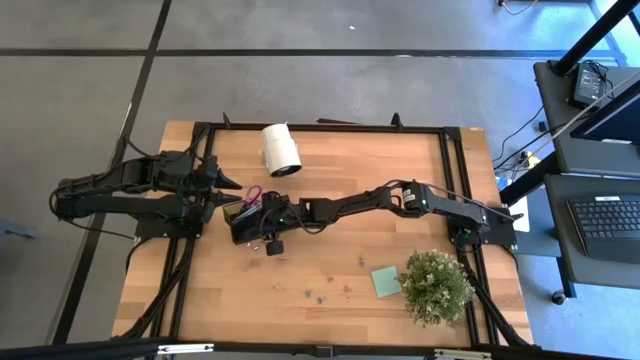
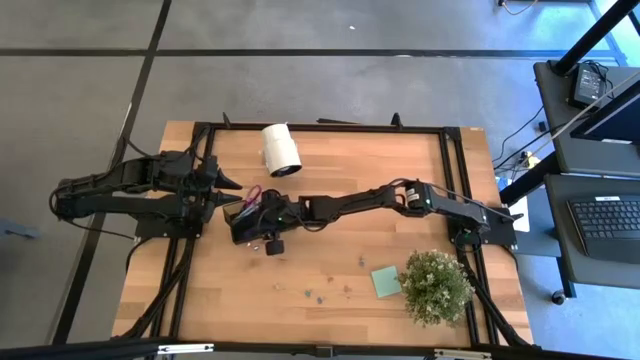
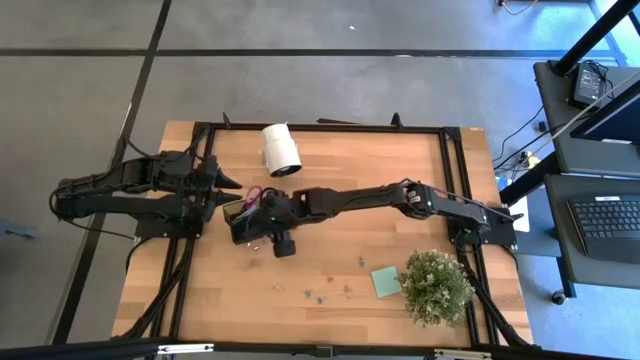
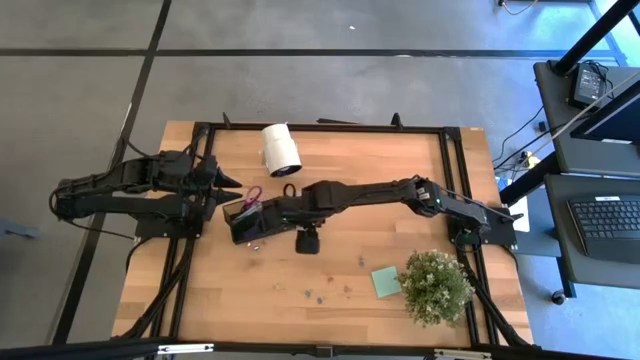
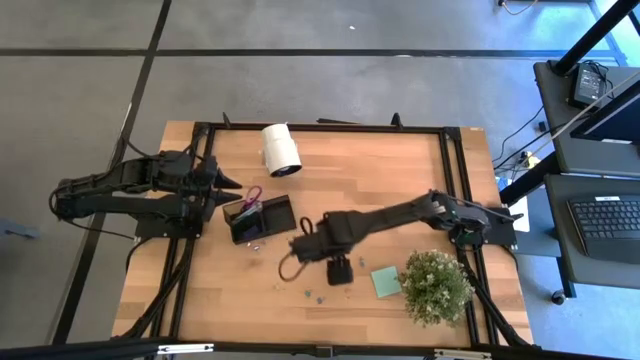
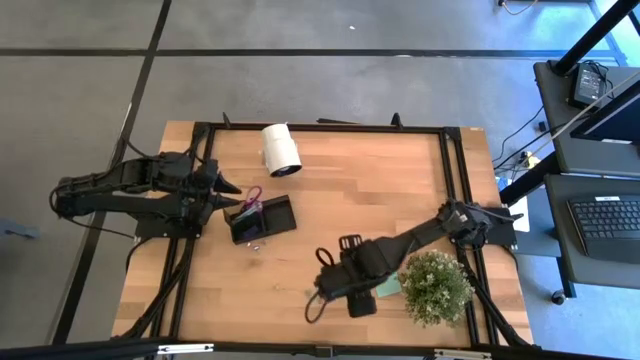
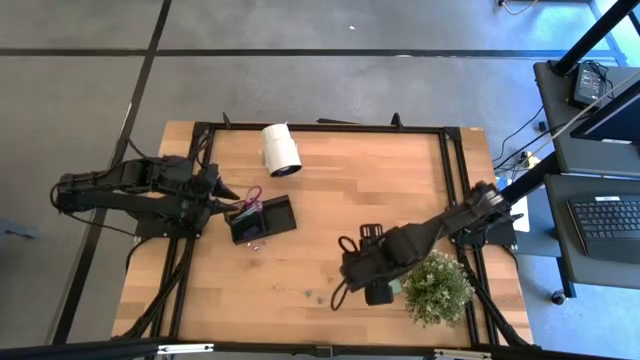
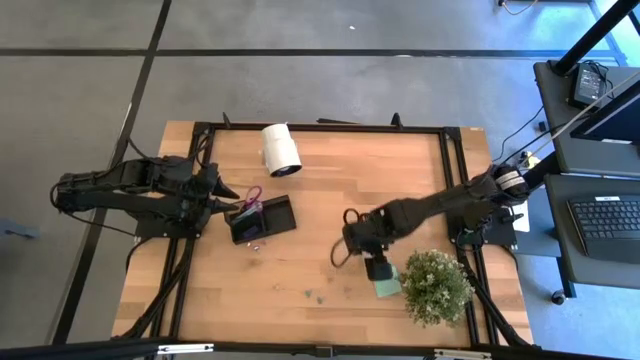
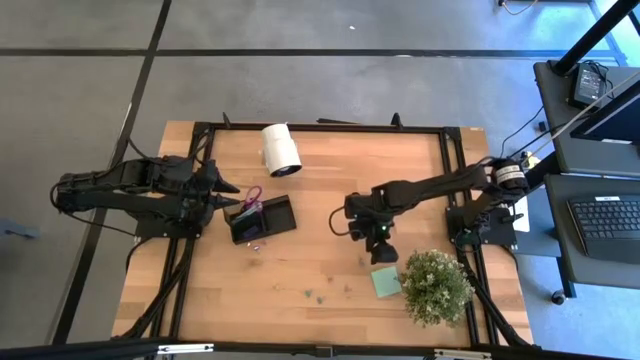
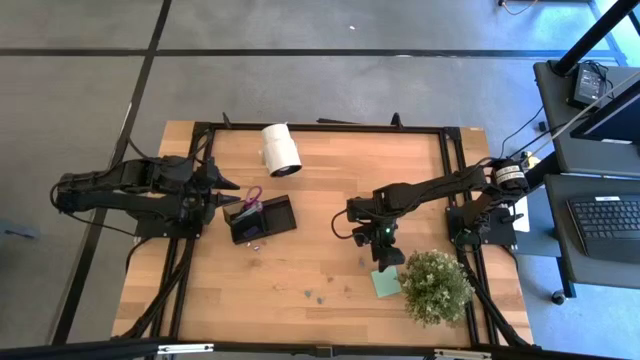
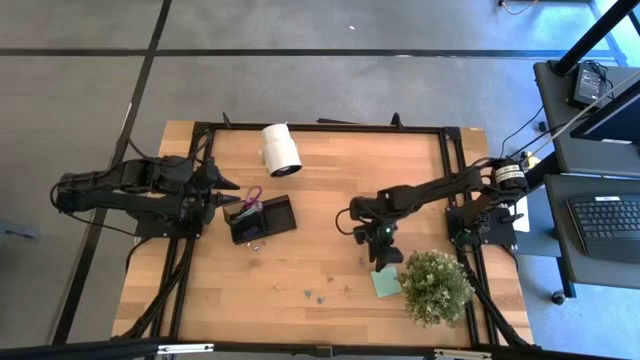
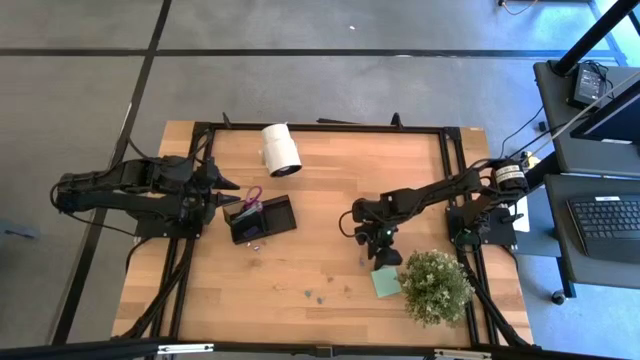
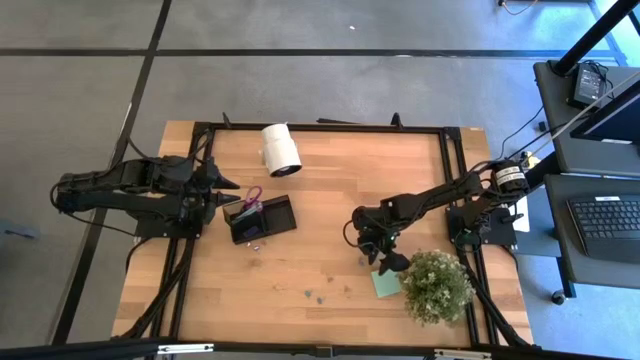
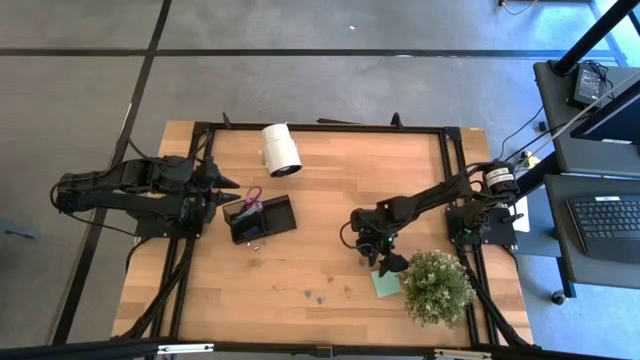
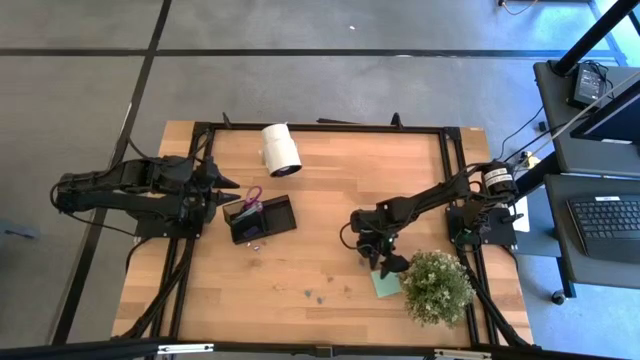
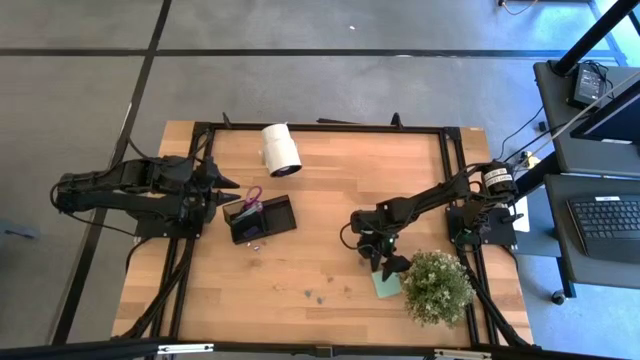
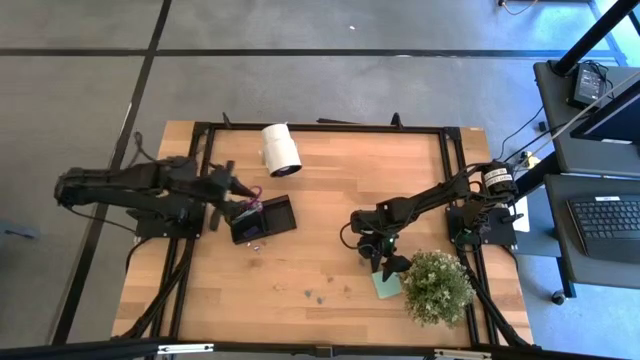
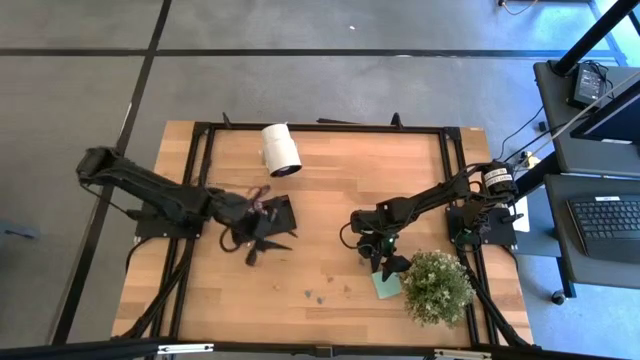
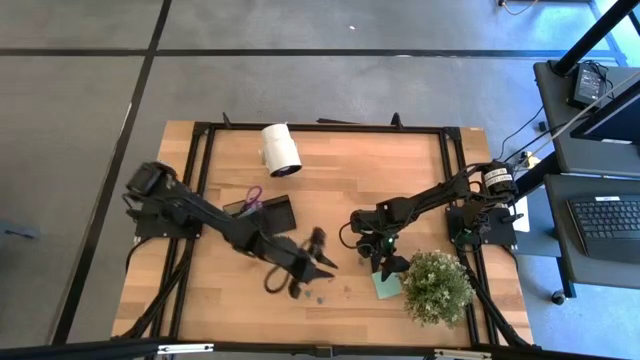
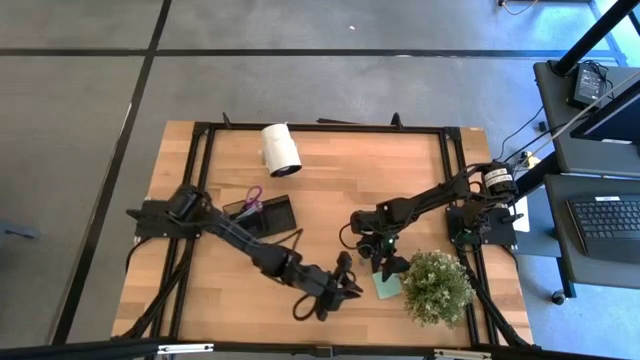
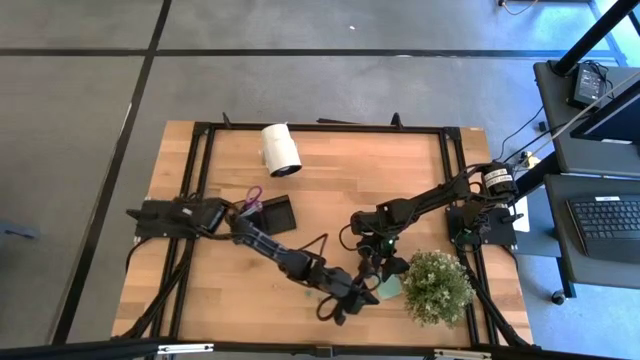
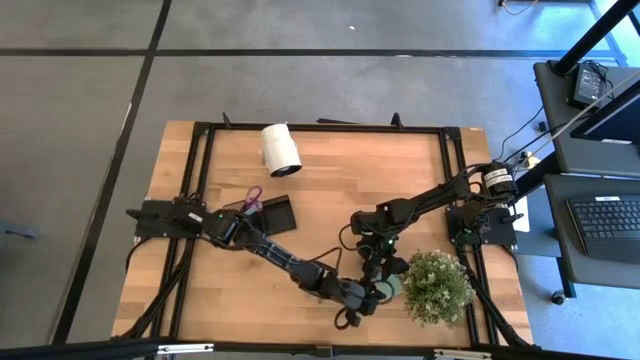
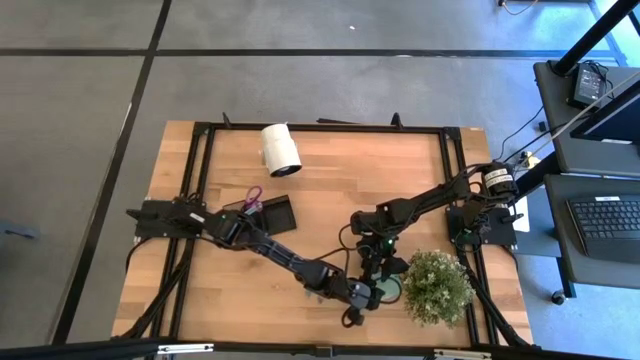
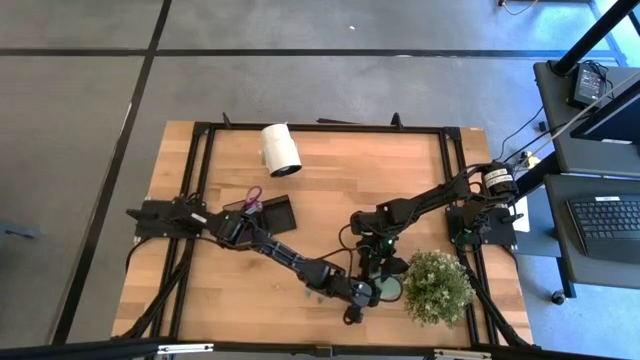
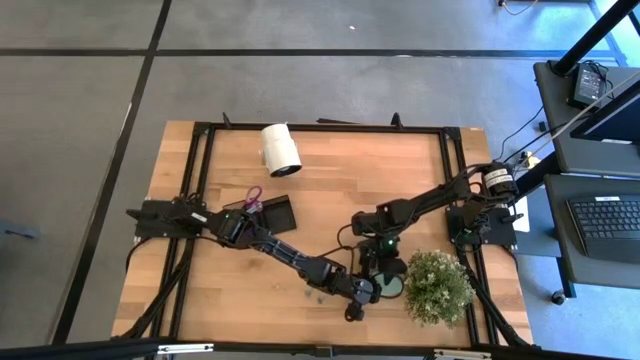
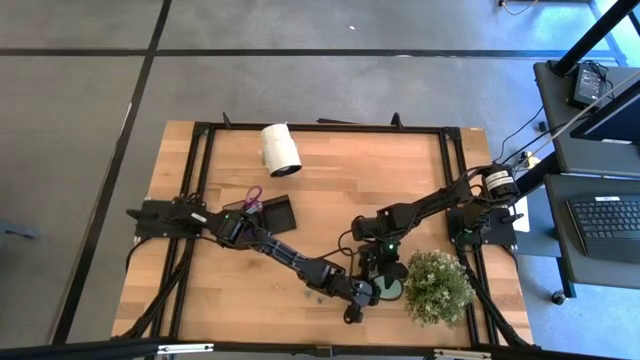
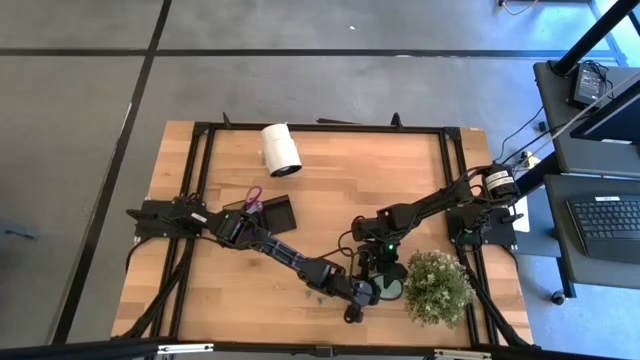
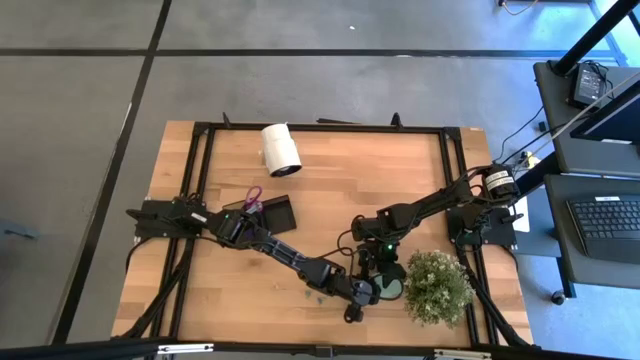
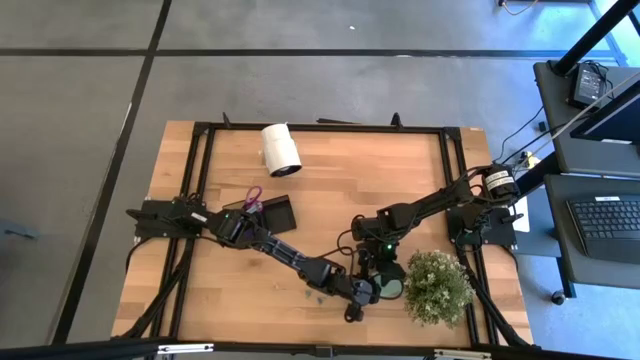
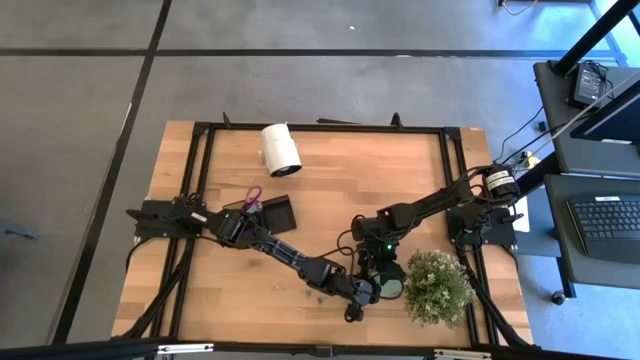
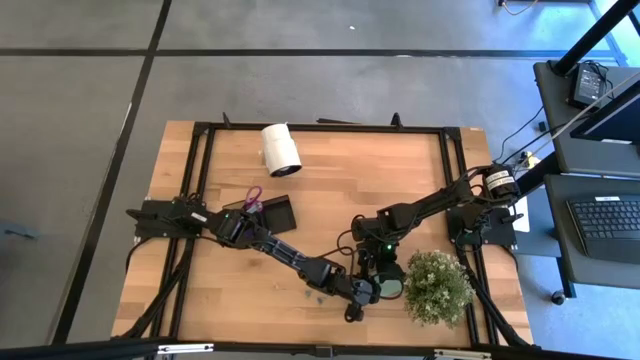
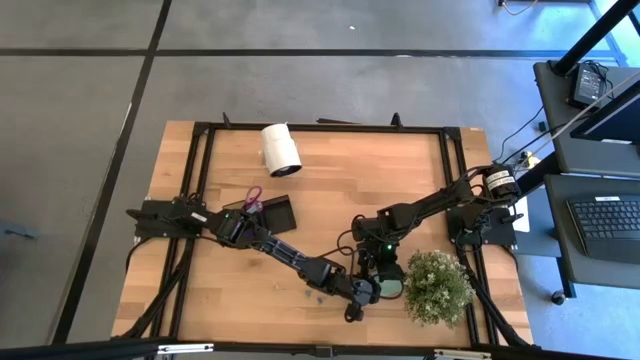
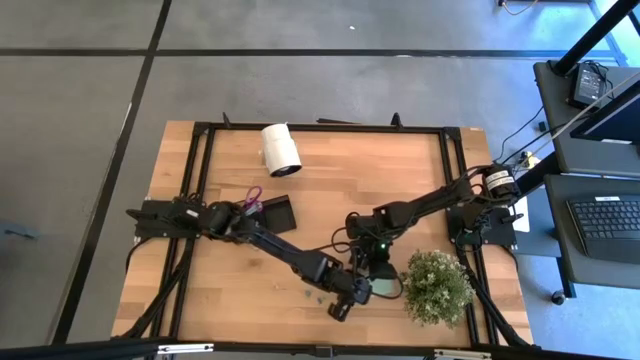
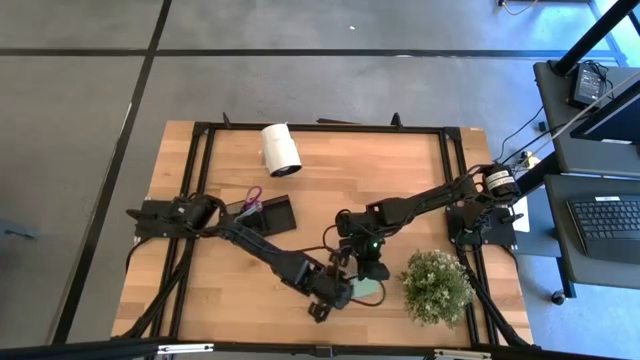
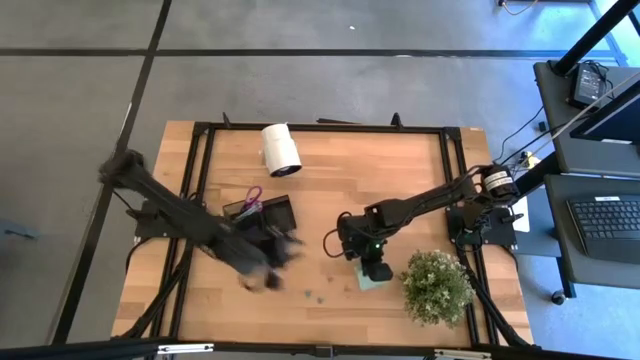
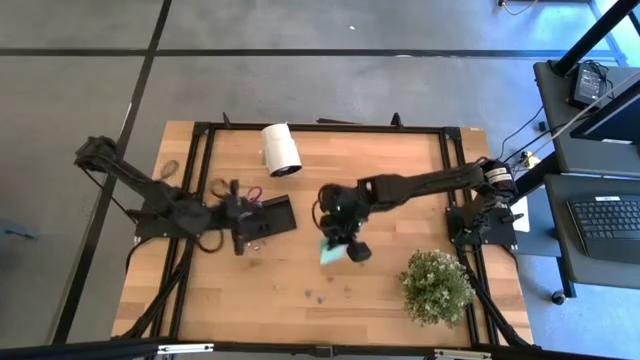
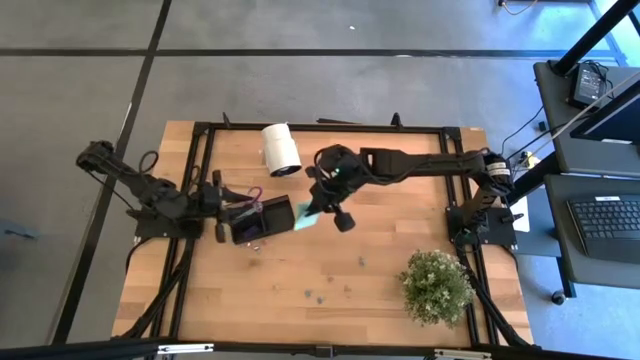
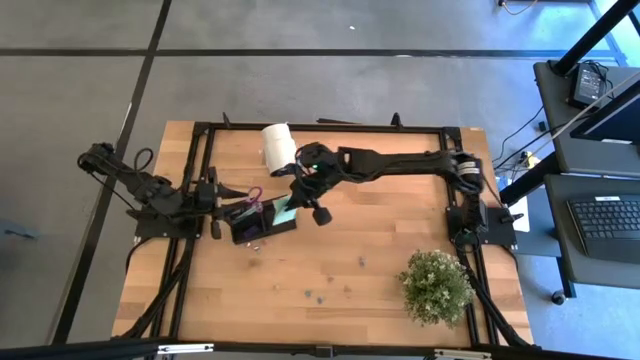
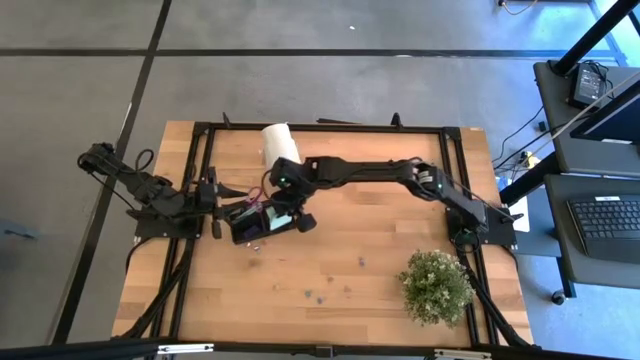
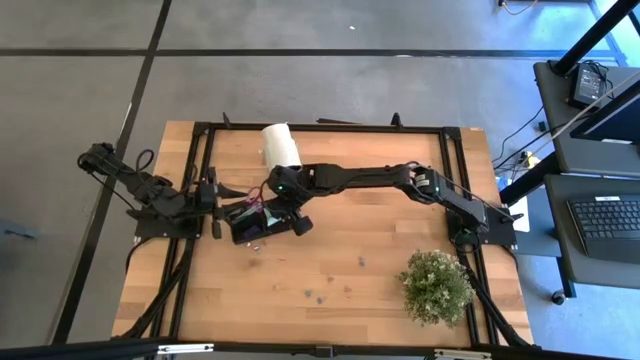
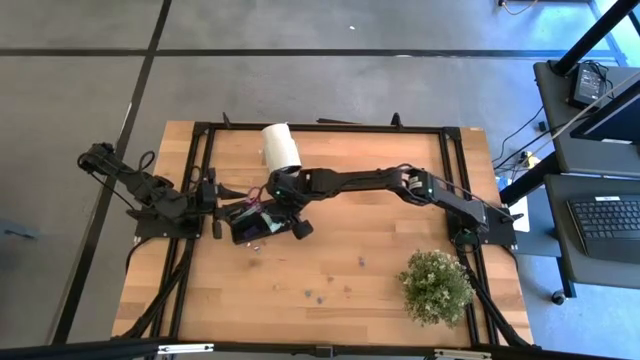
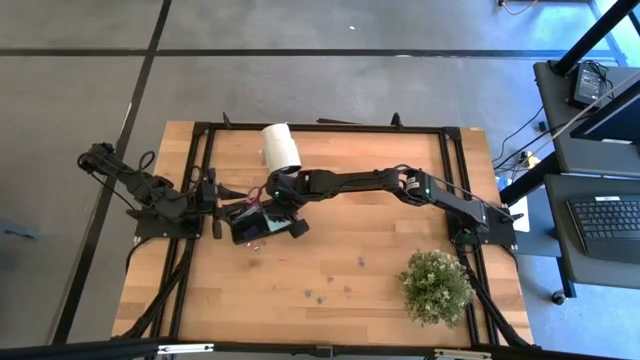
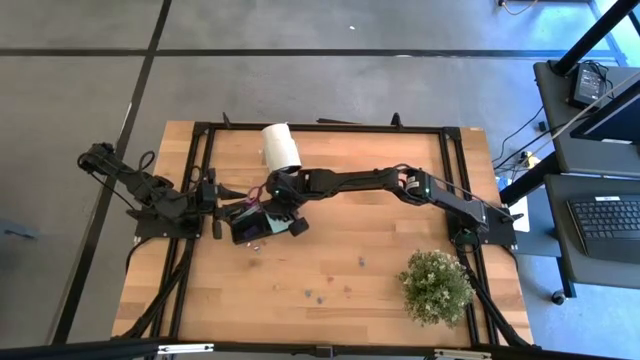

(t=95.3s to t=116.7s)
Task: Pick and place office supplies into organizer
Put the blue sticky note pad into the black desk organizer
